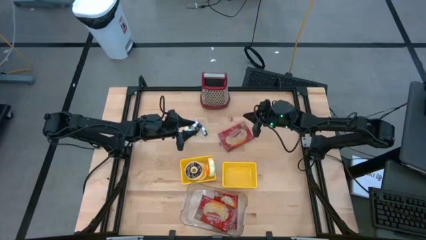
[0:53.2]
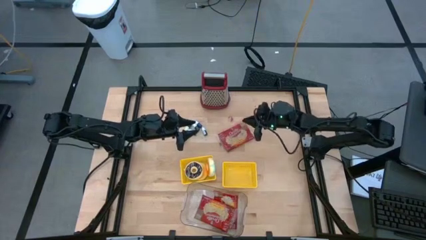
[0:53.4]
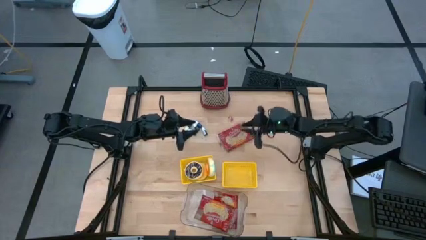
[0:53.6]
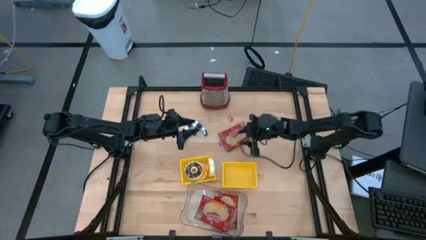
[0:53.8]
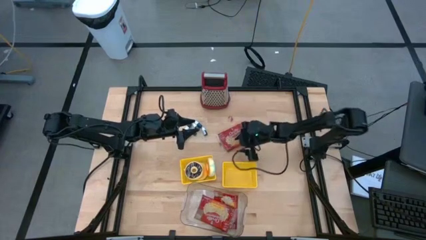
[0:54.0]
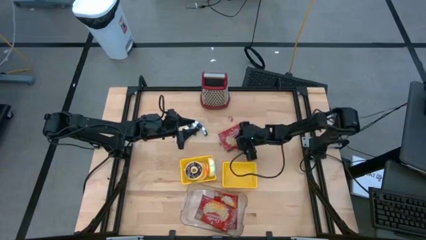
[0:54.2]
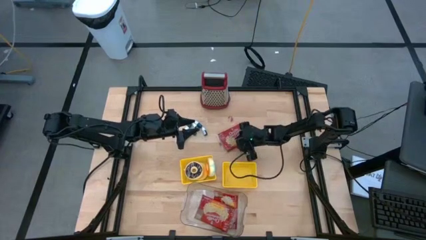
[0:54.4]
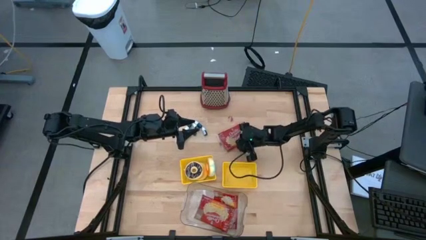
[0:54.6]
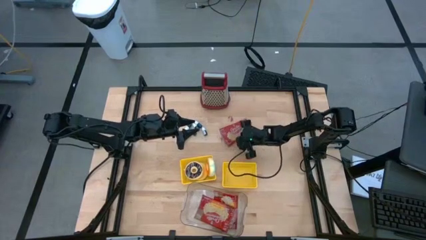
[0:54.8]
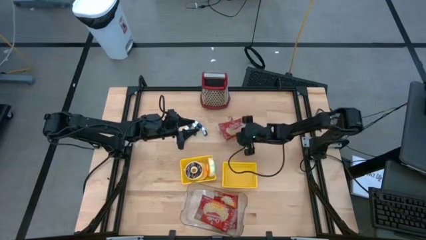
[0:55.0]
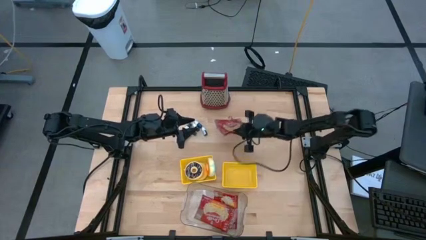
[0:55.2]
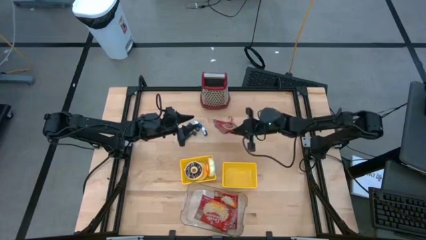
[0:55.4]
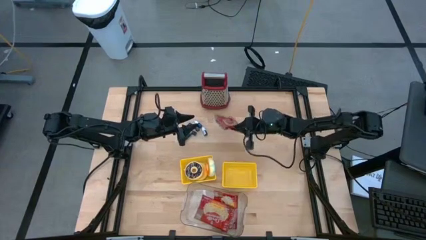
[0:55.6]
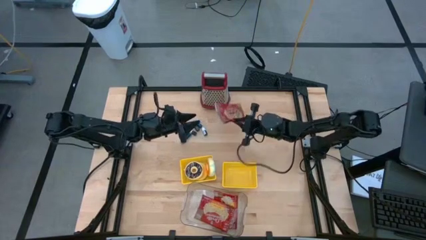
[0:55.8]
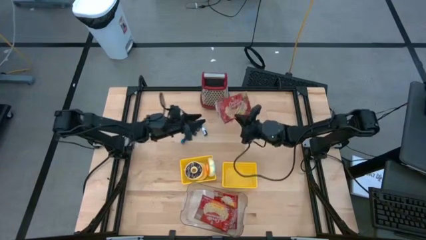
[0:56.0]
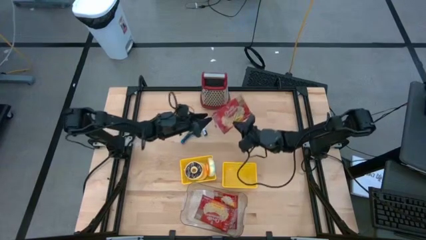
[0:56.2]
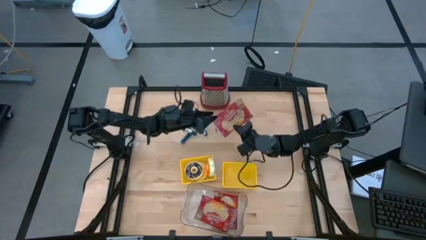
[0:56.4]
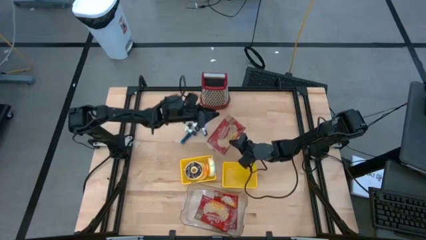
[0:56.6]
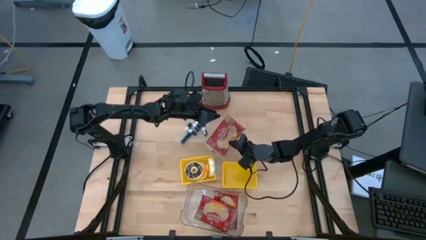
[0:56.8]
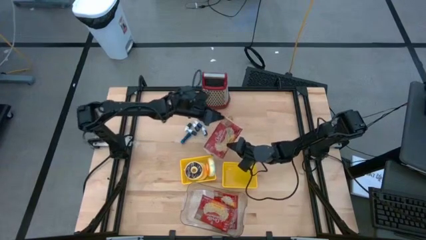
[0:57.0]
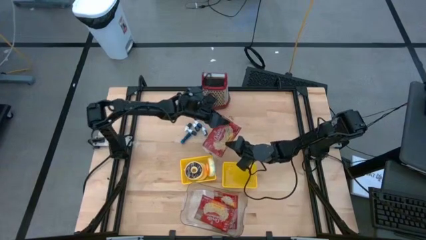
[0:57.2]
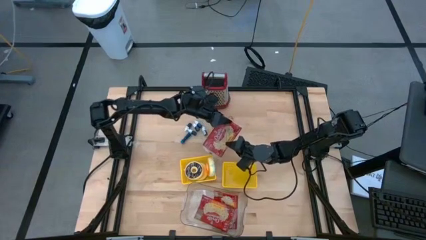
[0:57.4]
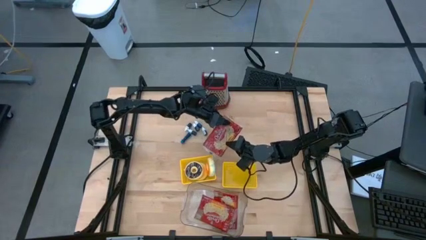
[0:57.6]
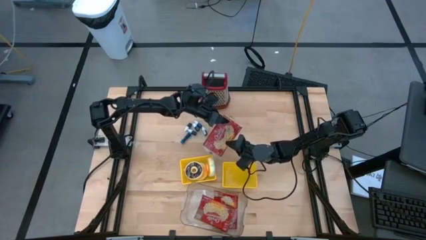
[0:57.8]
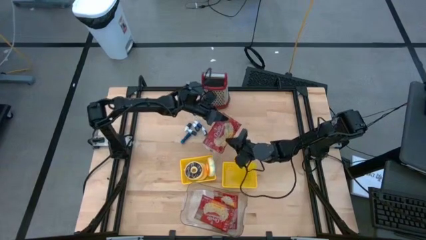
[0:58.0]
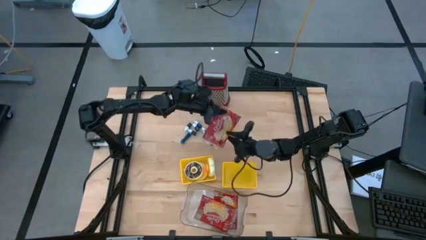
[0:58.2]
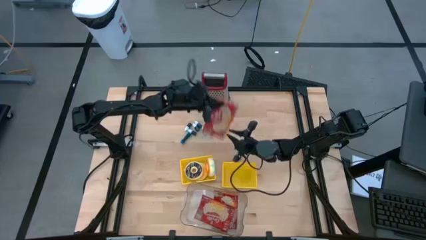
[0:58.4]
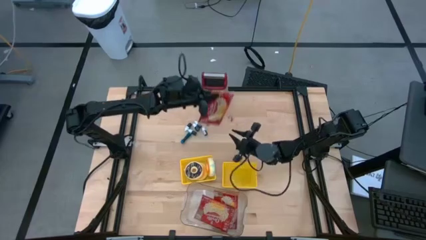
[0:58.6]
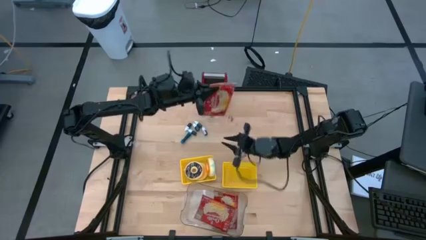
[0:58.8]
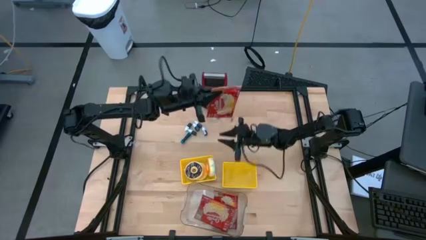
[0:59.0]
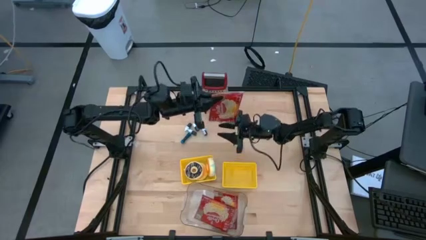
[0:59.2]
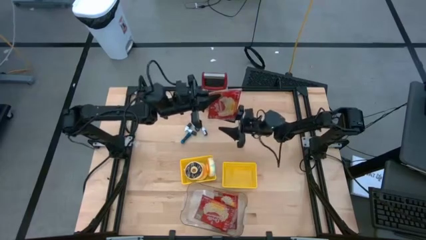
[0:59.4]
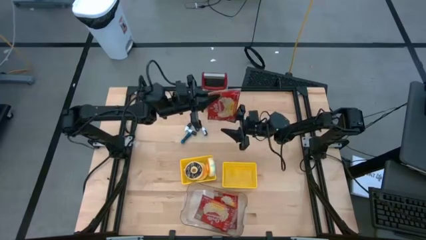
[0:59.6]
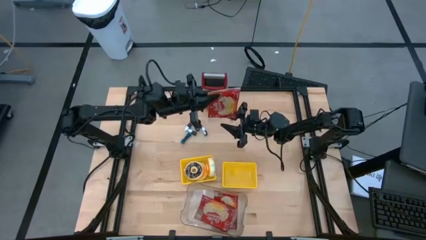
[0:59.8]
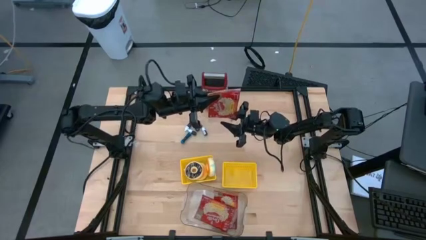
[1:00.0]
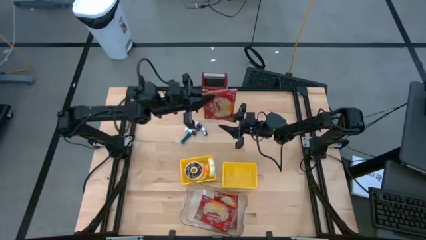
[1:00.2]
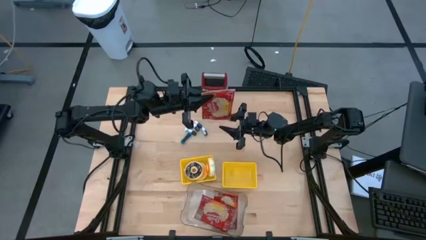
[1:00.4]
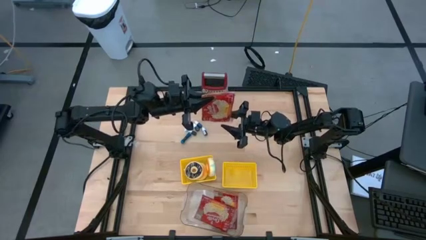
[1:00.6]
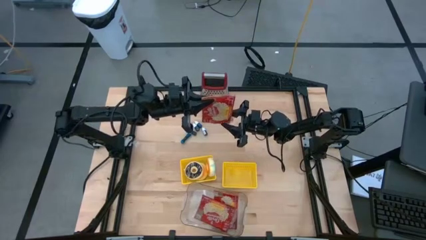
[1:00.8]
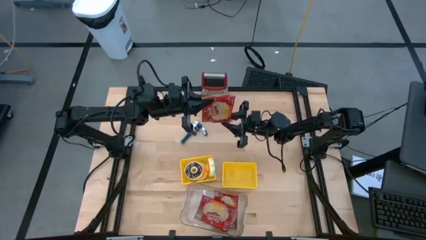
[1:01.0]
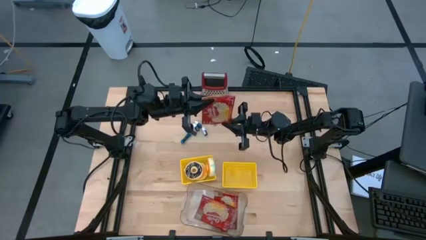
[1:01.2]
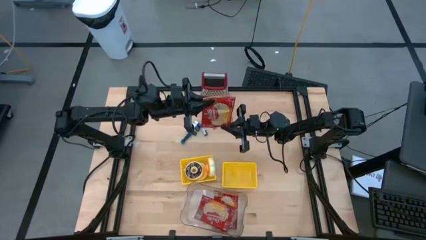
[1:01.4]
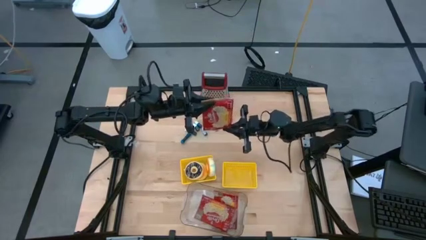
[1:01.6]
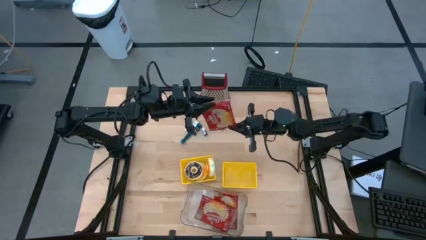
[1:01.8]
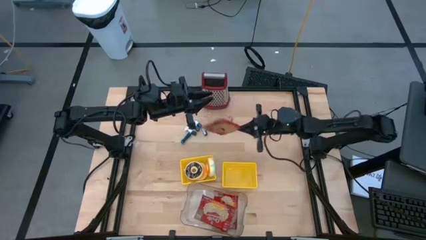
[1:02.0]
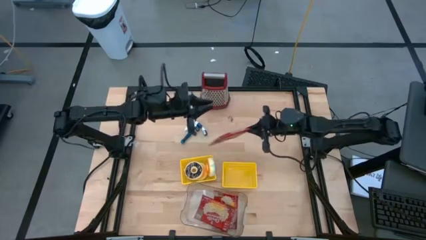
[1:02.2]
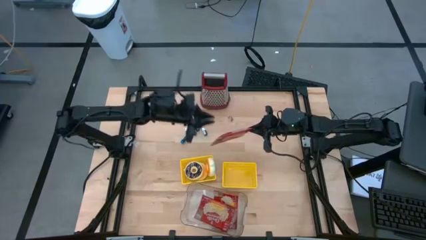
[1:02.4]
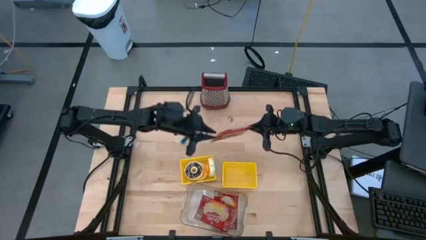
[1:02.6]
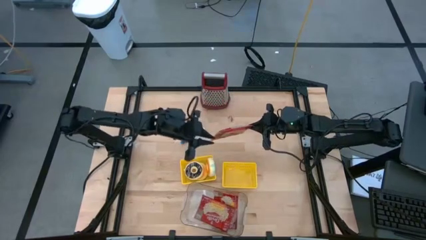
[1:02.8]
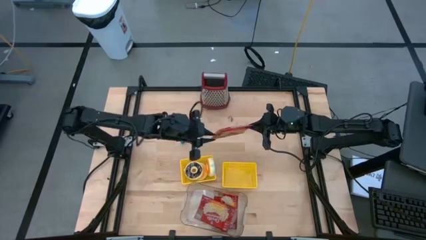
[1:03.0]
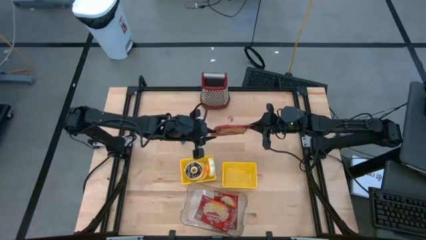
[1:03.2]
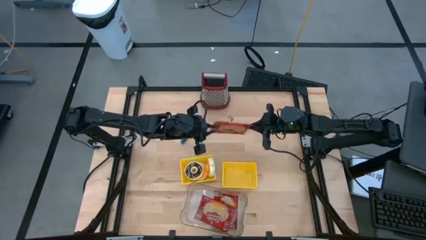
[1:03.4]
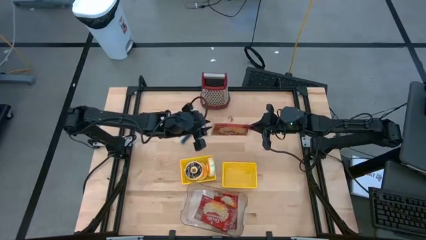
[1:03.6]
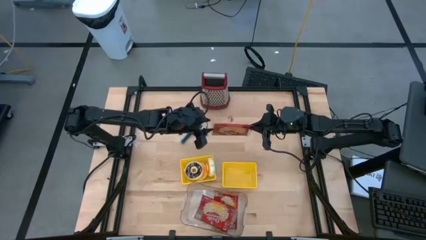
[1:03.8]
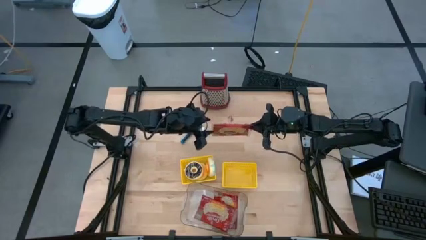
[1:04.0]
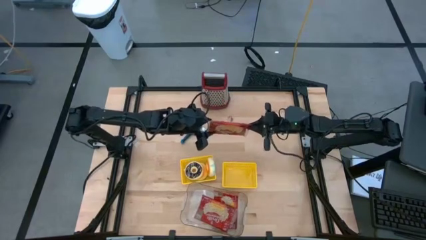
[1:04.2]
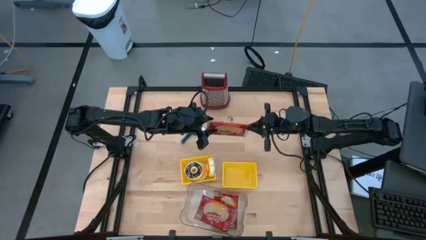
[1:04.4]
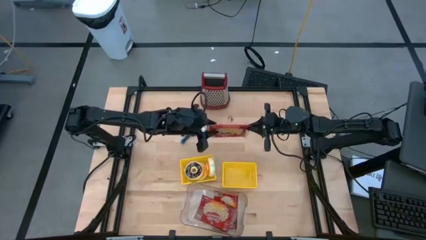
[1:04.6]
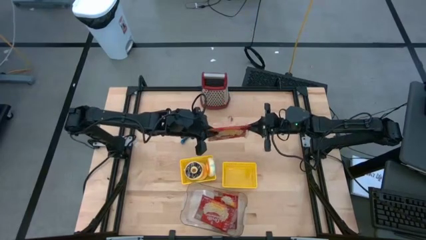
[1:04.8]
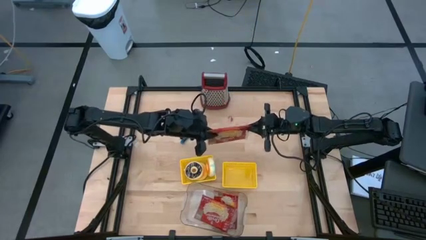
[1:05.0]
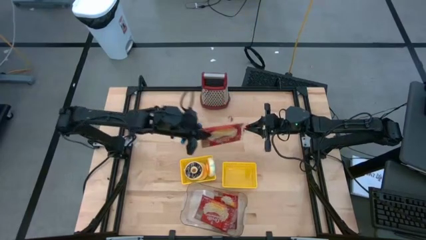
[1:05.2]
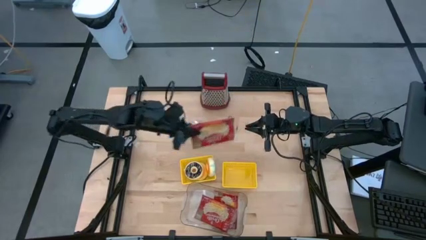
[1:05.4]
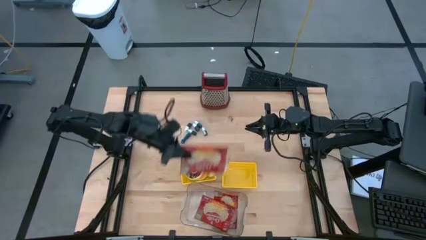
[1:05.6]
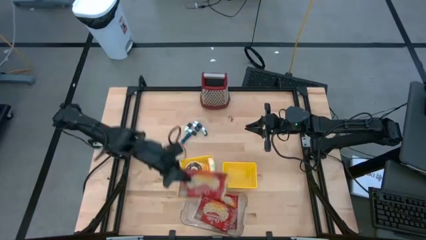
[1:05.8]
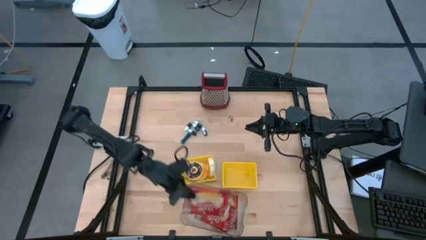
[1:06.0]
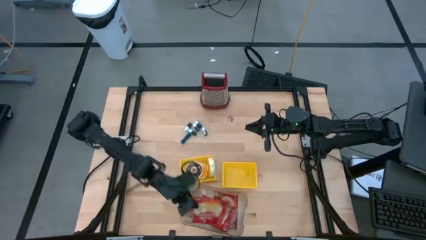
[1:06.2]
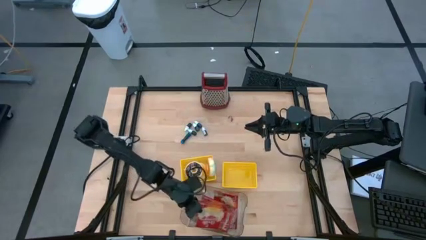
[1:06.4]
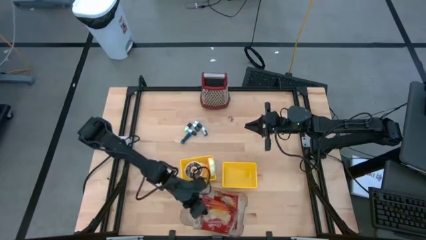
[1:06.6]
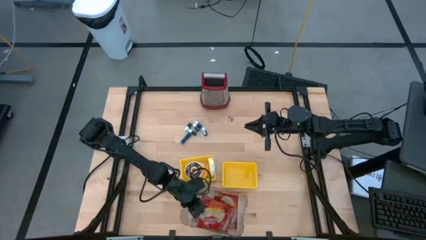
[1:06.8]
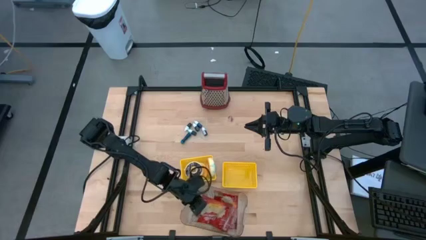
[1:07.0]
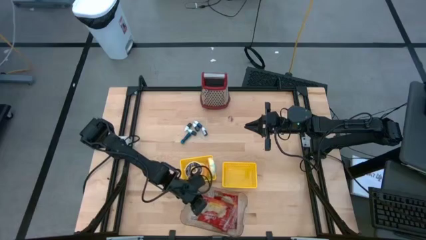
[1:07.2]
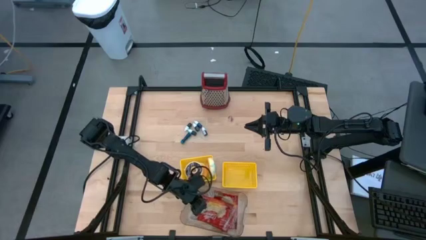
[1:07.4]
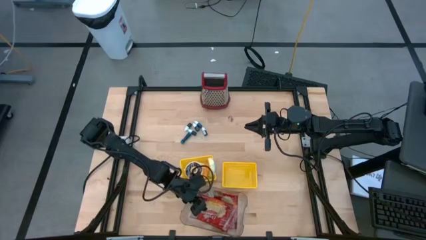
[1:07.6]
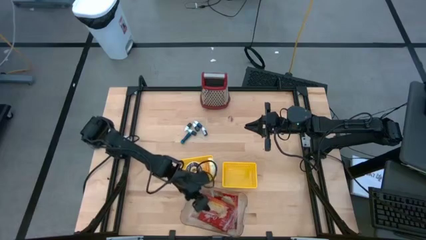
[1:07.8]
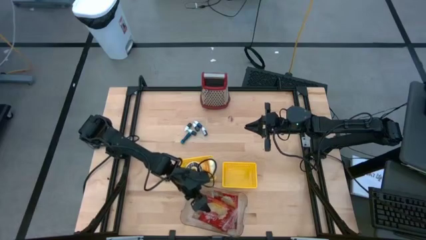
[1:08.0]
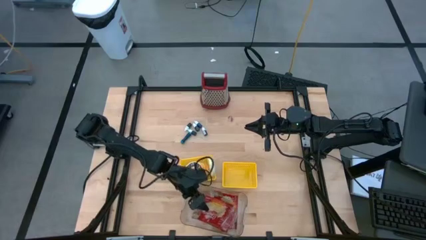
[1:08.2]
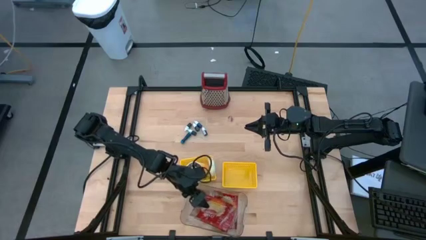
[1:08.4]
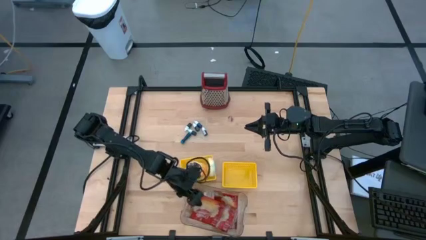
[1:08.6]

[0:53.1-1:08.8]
Put the red popcorn bag into the transparent bin

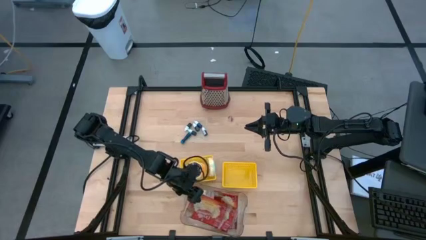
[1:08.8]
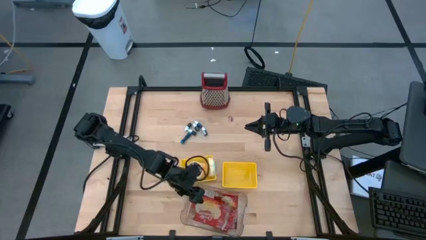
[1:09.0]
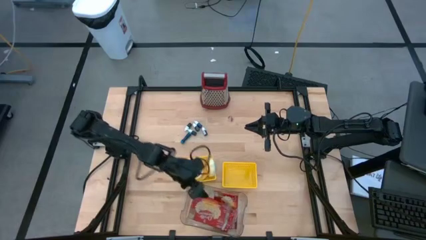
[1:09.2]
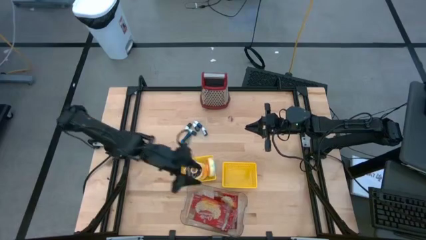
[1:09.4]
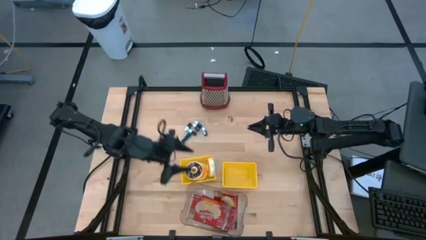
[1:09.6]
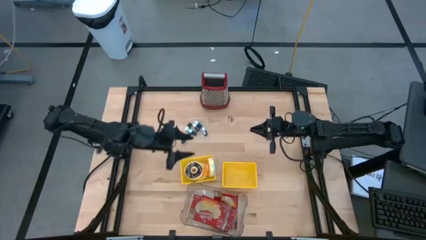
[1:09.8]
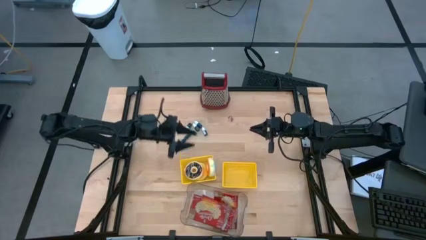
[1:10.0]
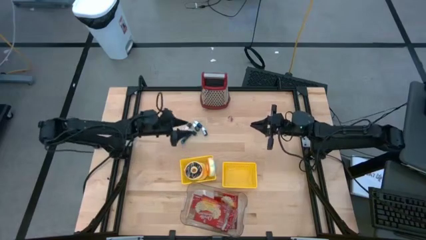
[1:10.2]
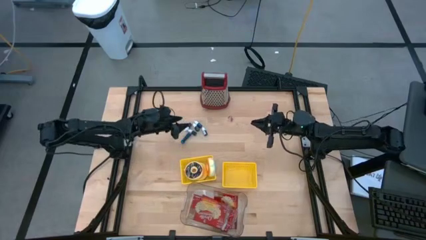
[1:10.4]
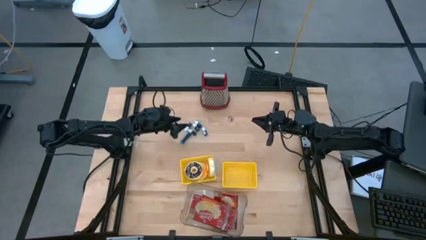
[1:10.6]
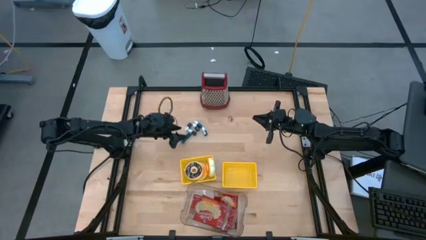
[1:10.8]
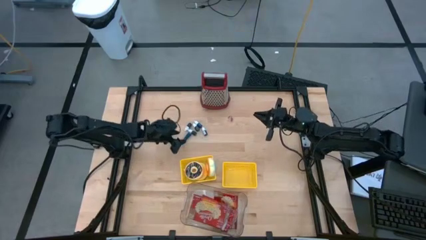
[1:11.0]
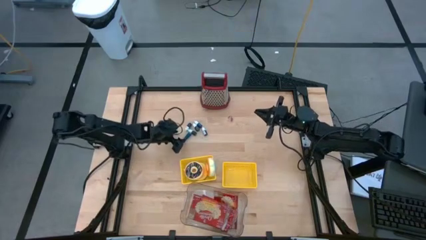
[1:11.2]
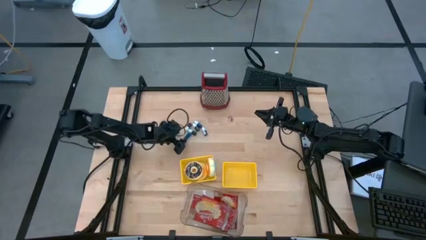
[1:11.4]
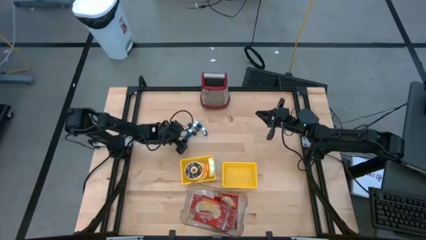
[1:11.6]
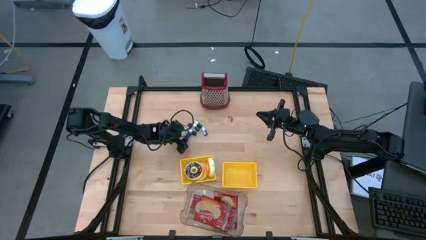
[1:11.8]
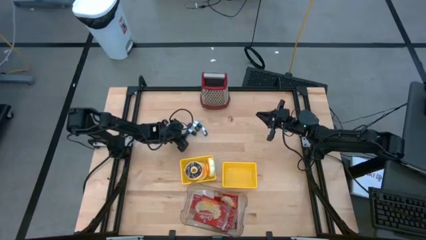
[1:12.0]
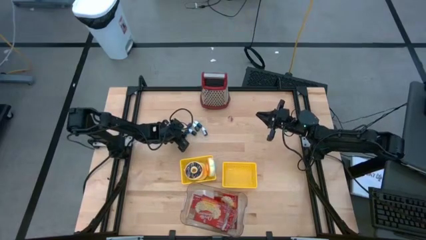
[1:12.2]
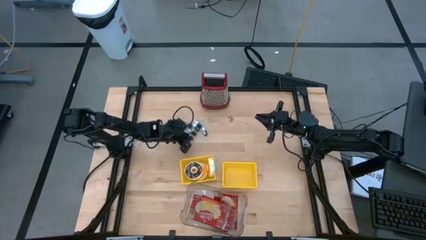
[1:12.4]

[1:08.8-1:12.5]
Put the large blue food coloring bottle into the right yellow bin
